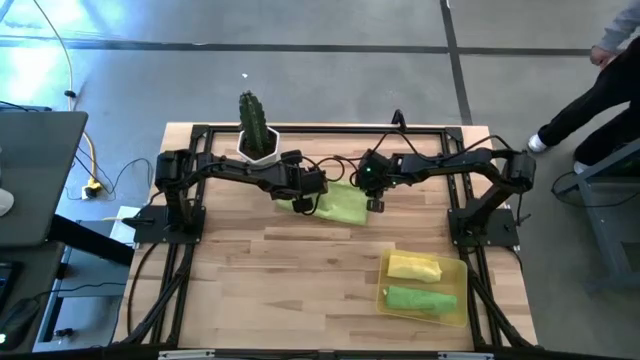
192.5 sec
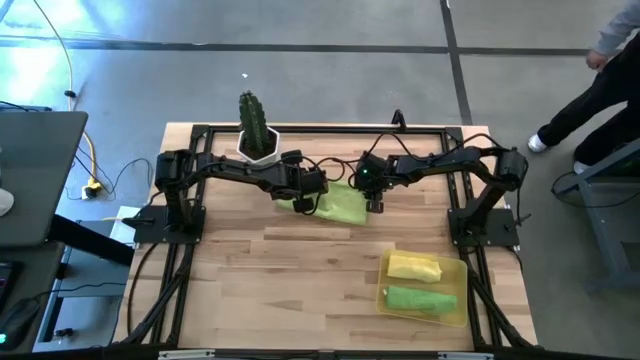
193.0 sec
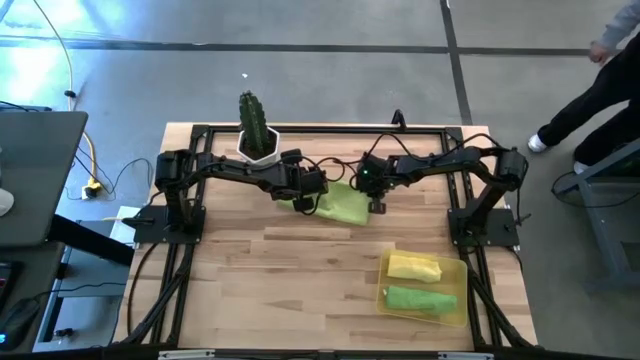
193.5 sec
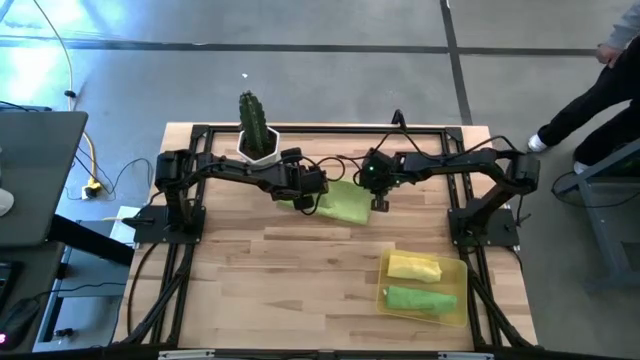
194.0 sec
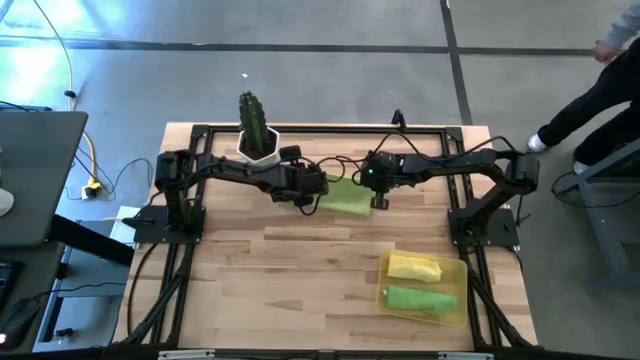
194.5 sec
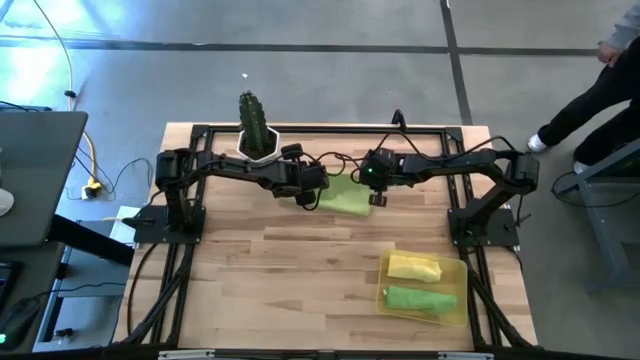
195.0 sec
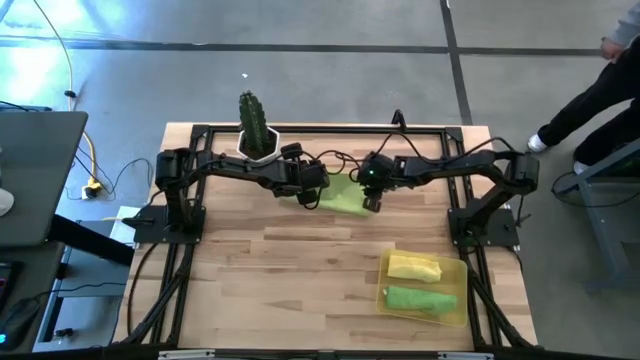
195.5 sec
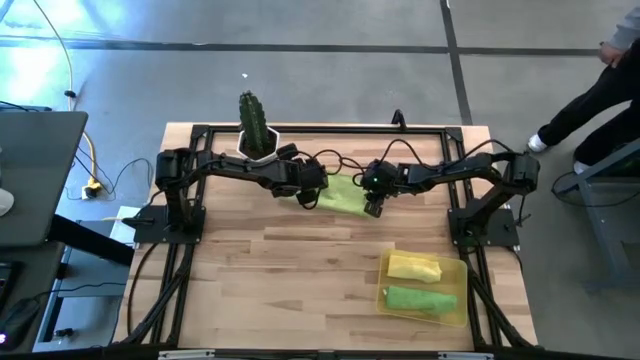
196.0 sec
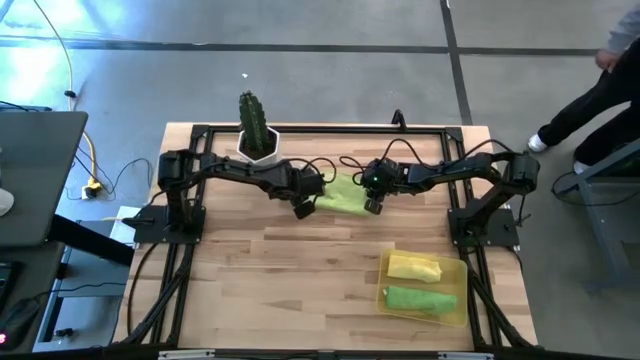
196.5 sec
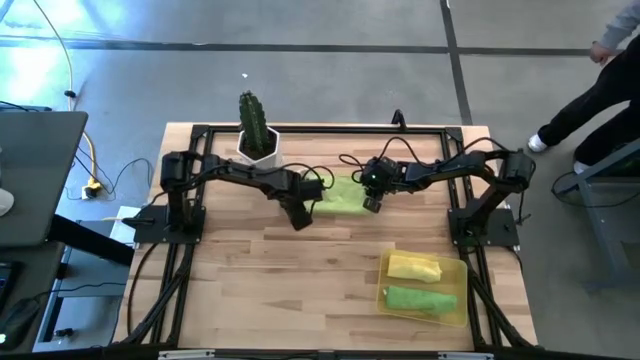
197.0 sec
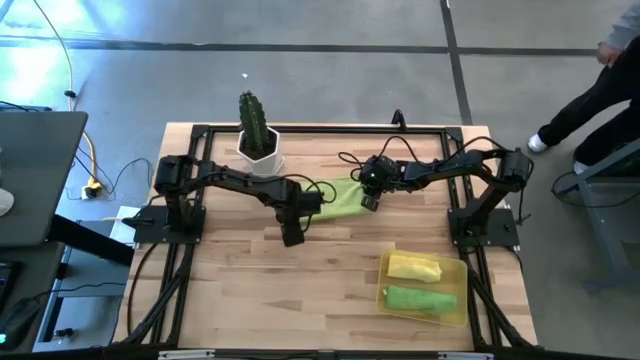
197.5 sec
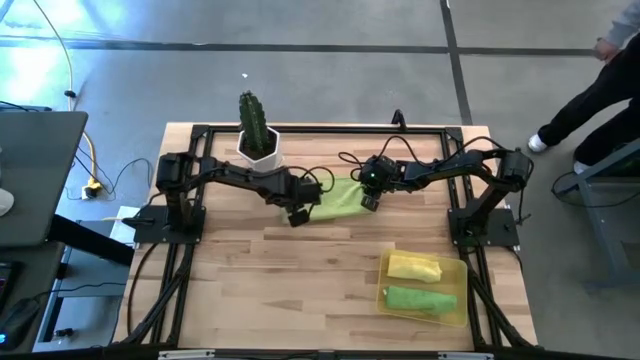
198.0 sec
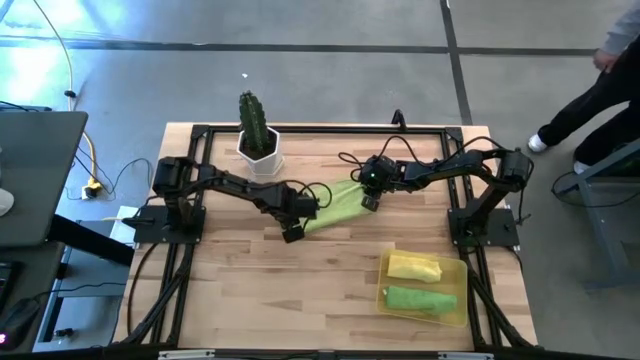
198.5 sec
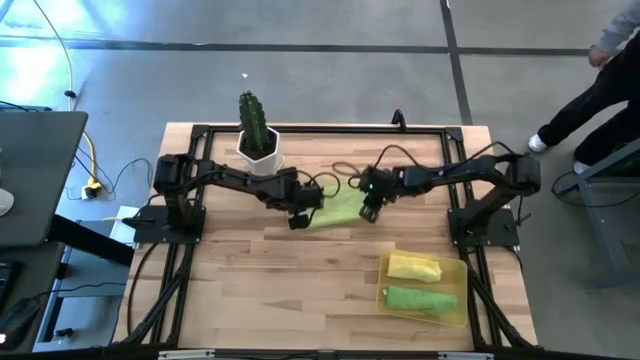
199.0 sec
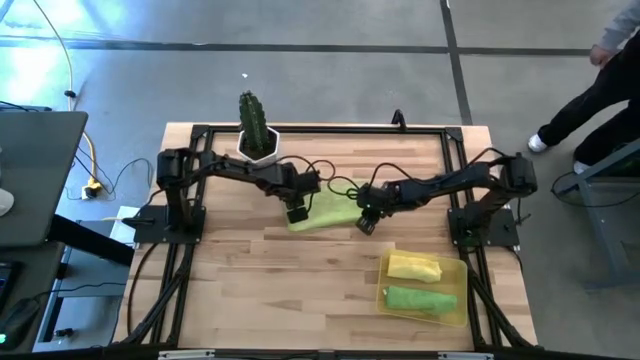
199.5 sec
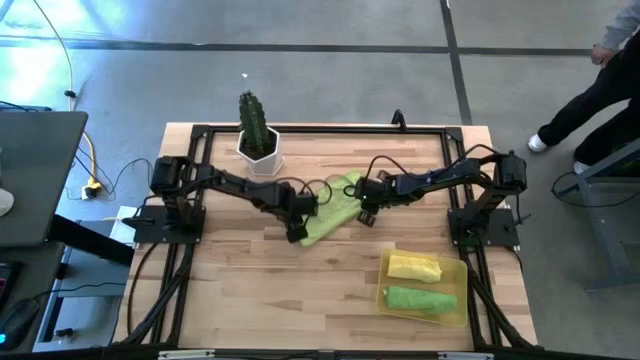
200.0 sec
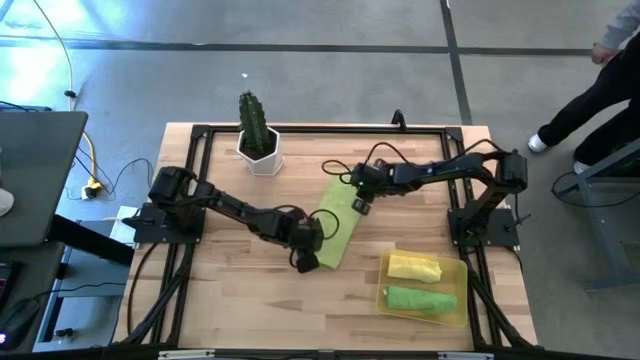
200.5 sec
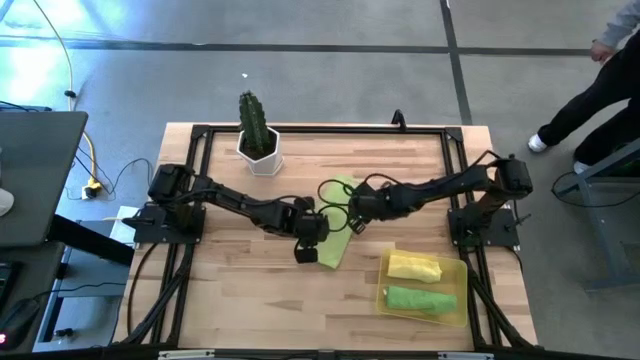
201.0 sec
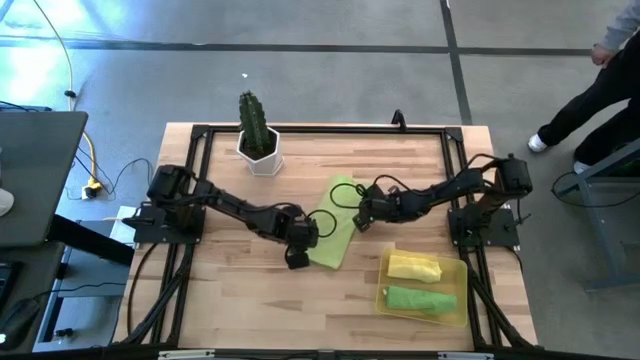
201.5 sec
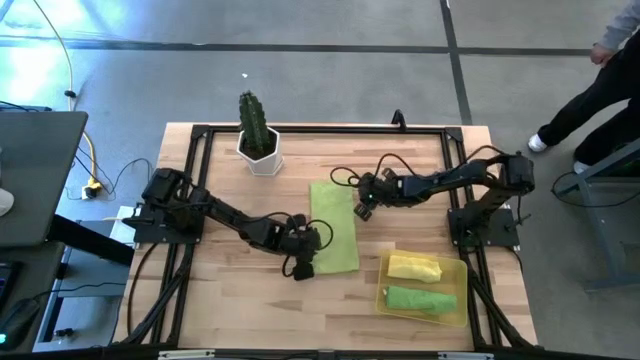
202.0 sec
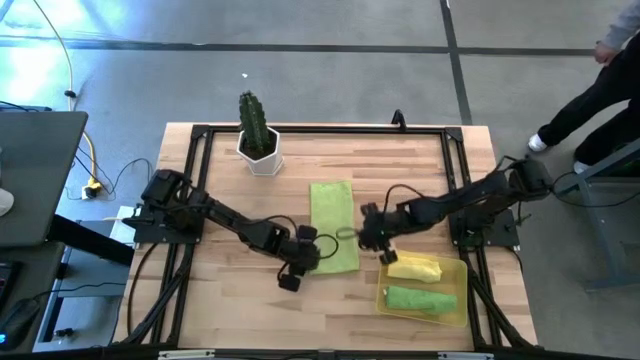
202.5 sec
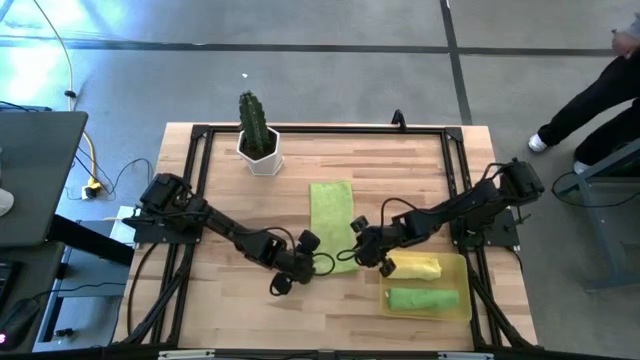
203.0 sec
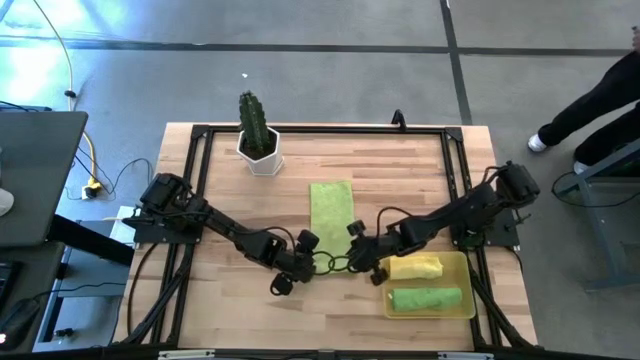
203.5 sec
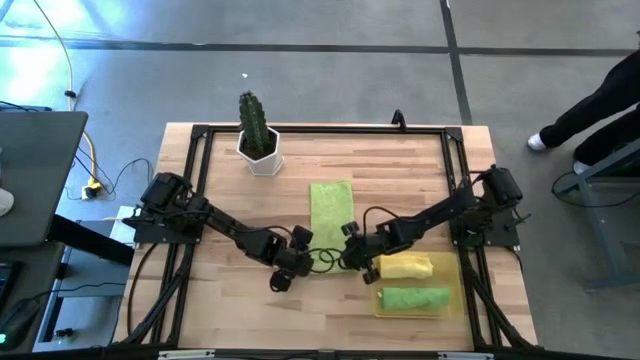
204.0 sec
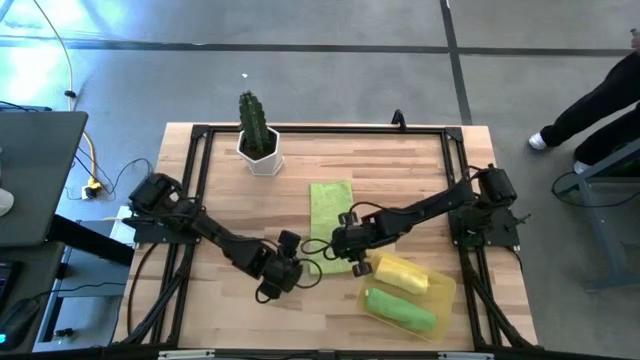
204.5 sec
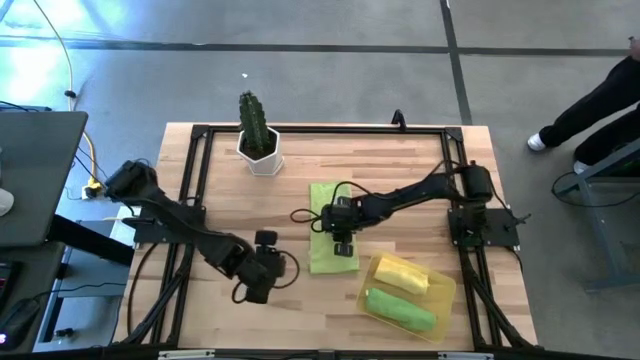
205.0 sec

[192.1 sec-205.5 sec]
Task: Roll microfiber towels into tight, uniform cylinder then place into a basket
Fold the light green towel

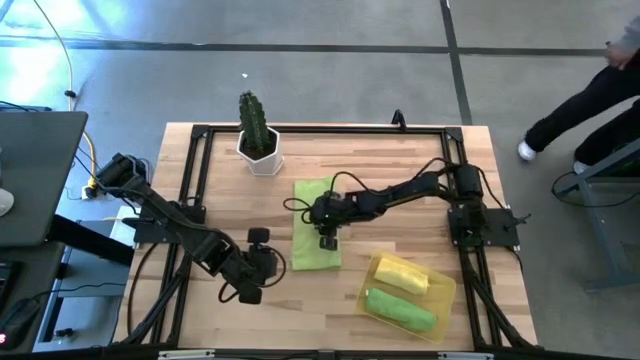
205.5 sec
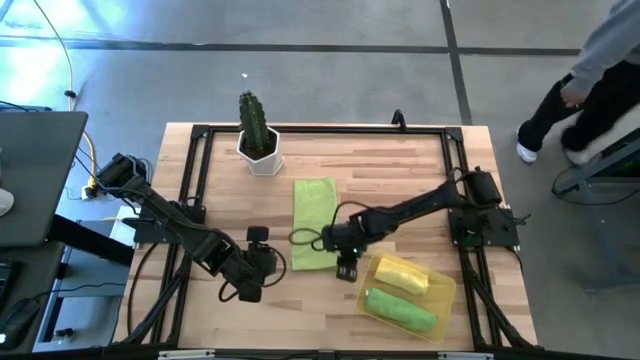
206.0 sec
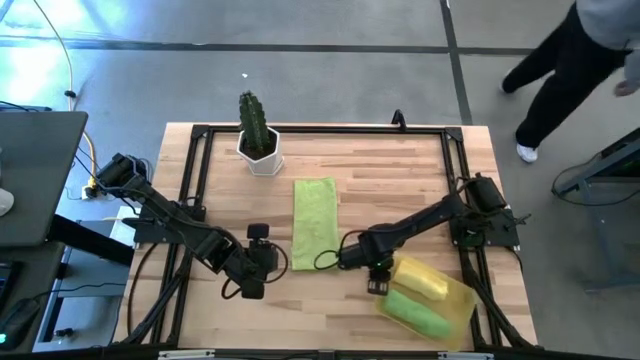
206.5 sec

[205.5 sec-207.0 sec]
Adjust the yellow bin on the table

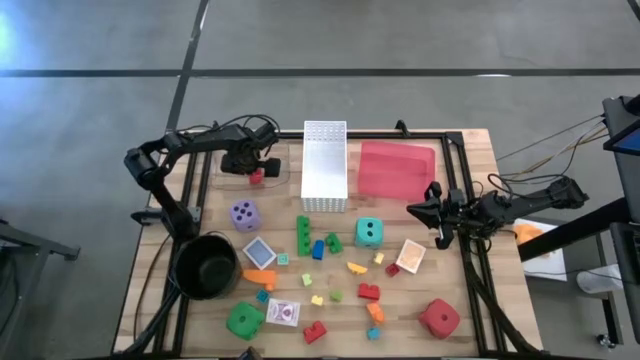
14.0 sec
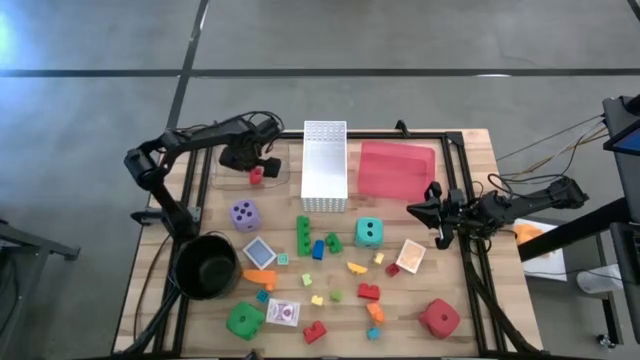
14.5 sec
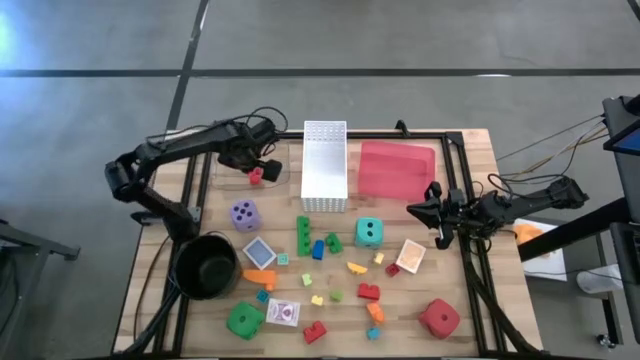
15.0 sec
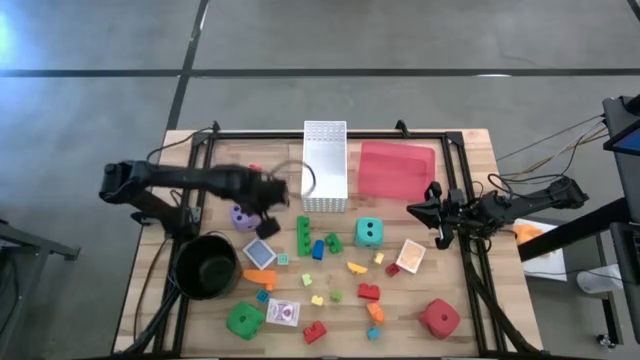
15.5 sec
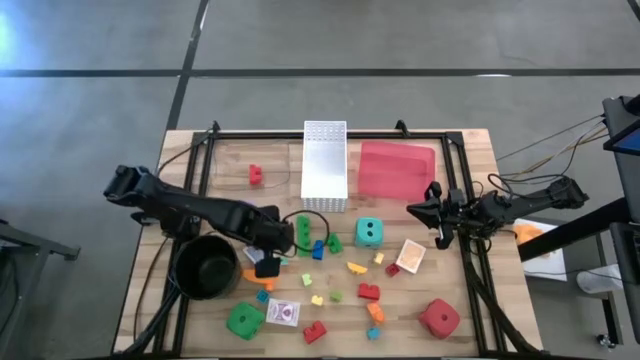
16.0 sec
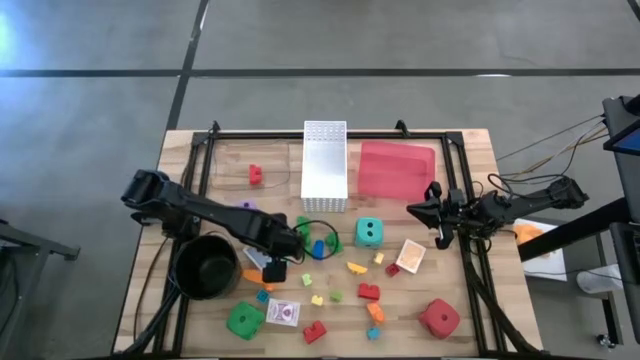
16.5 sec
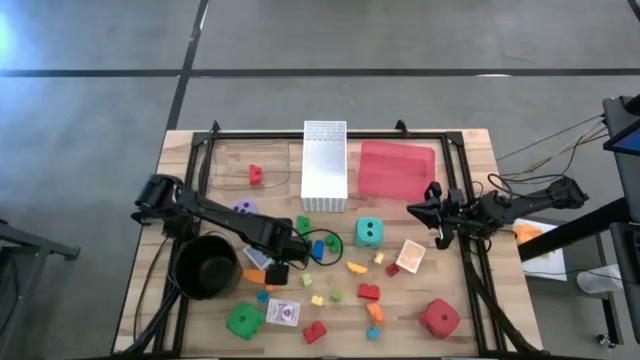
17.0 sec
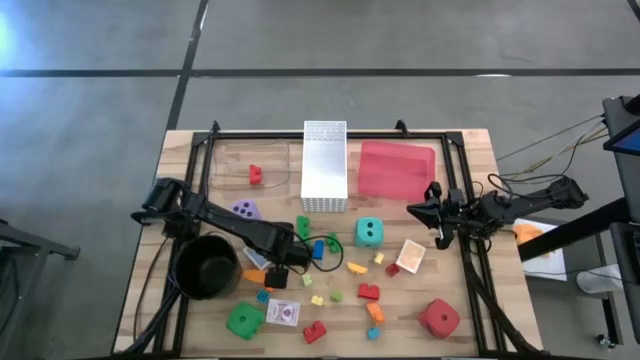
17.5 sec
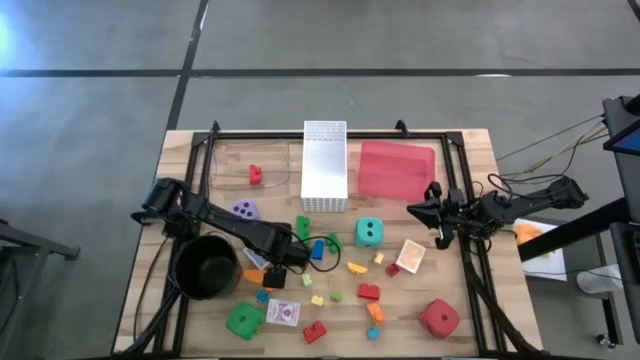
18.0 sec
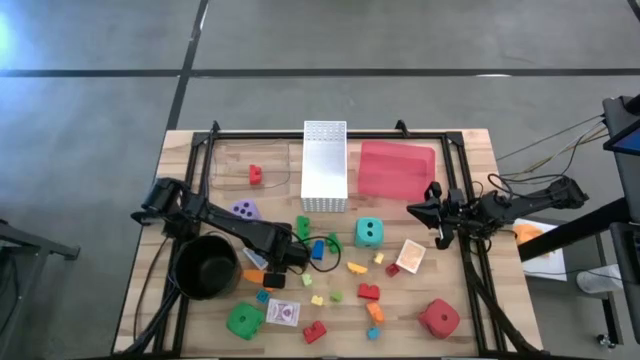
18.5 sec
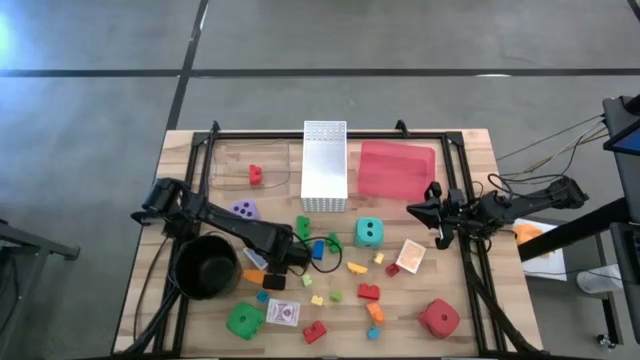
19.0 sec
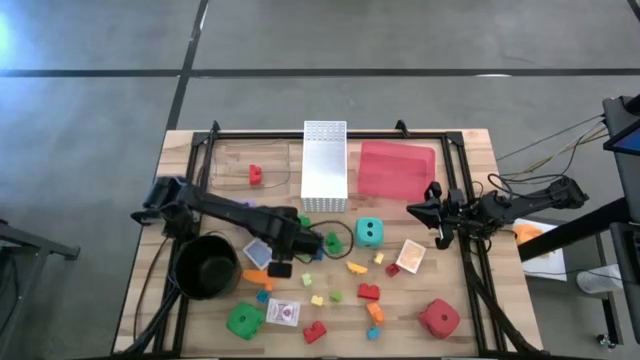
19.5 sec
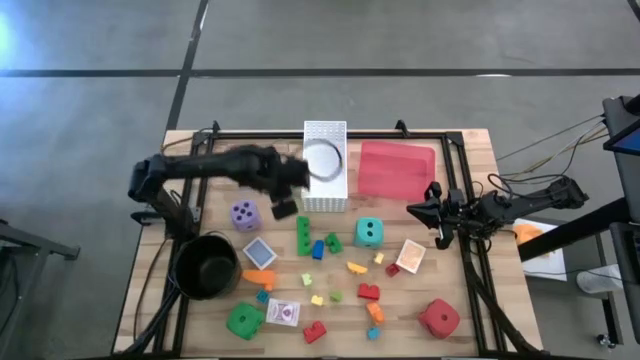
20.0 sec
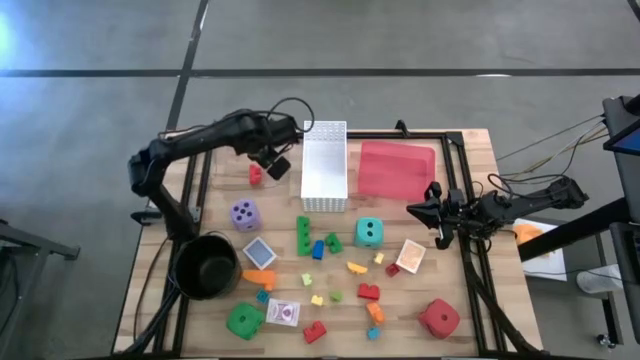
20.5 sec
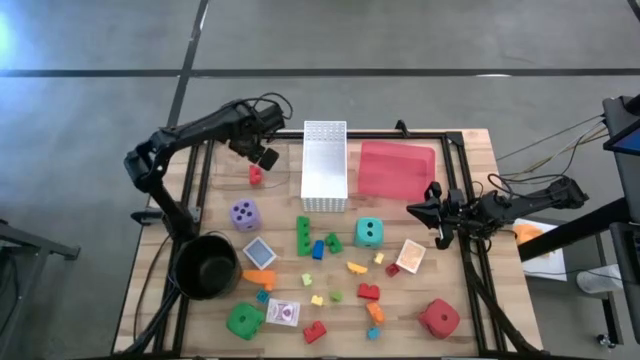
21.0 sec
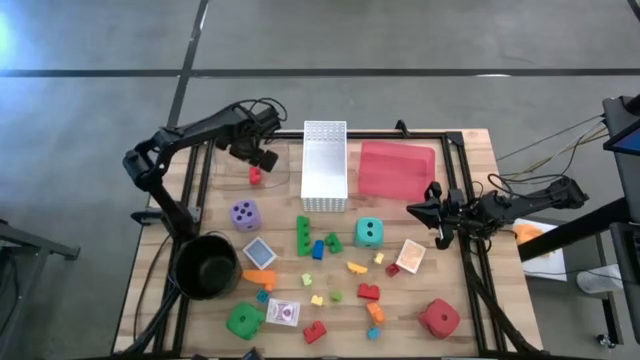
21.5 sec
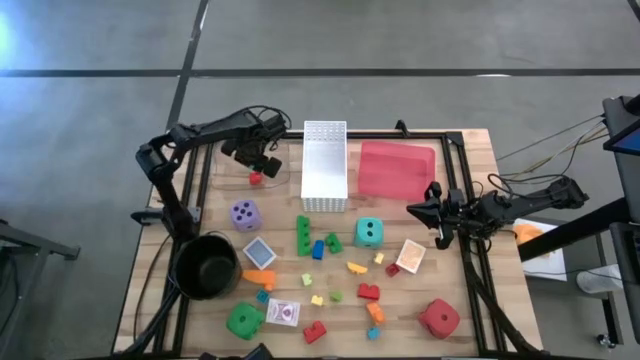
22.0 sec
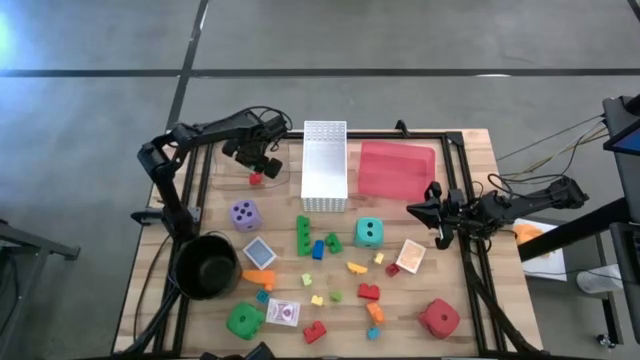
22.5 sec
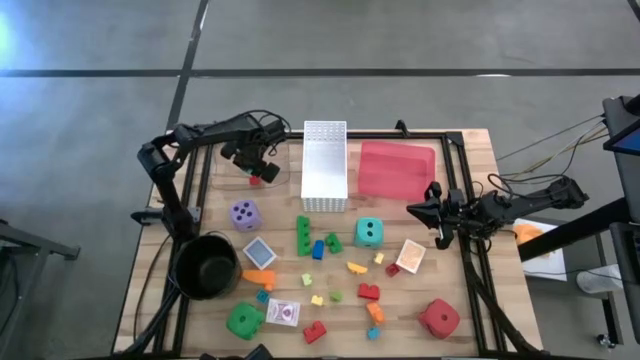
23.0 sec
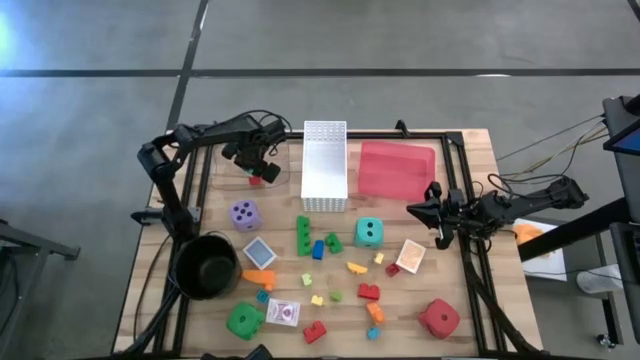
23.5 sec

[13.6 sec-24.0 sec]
Task: Pick & Place Toys
Put the light blue game piece into the transparent bin
